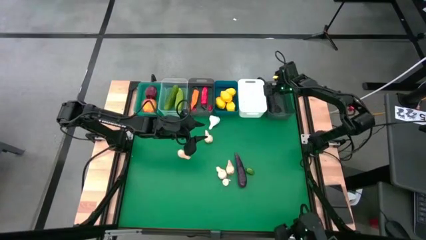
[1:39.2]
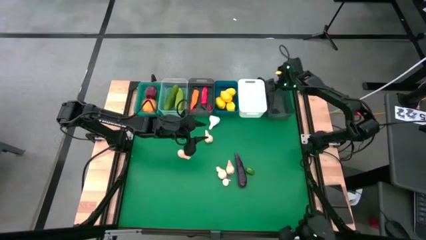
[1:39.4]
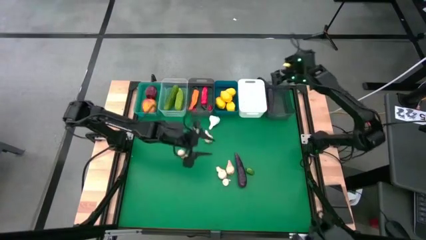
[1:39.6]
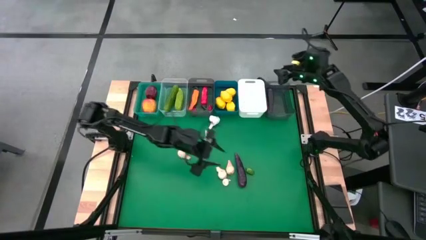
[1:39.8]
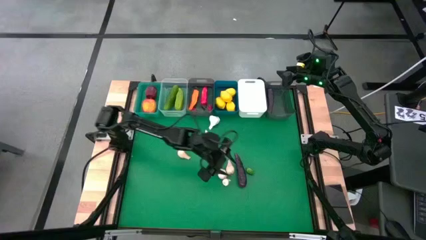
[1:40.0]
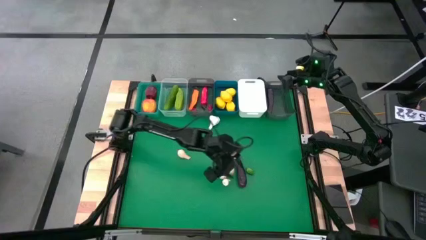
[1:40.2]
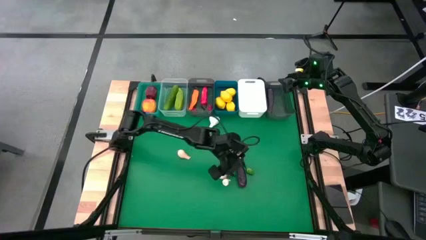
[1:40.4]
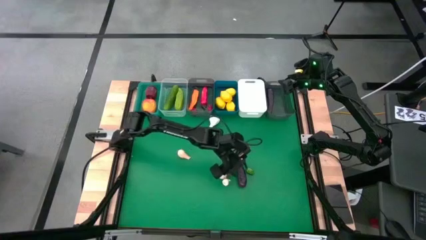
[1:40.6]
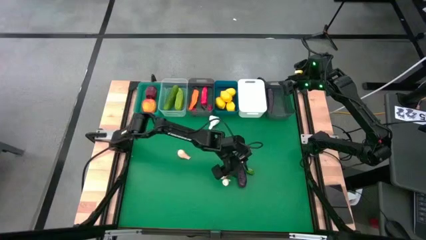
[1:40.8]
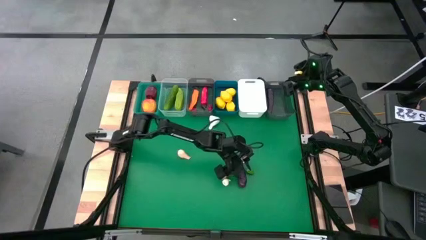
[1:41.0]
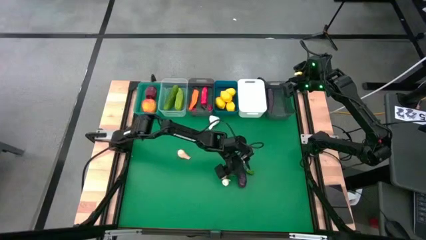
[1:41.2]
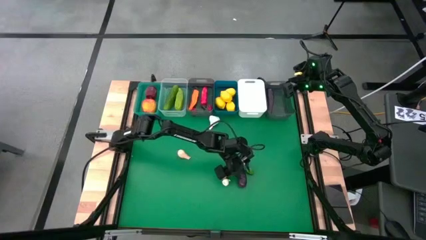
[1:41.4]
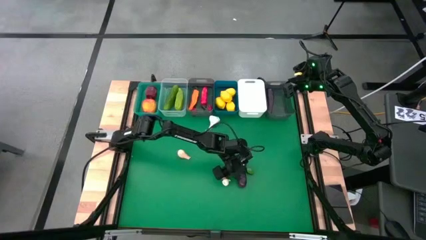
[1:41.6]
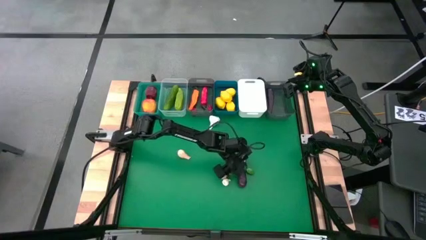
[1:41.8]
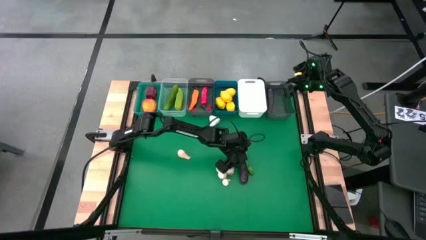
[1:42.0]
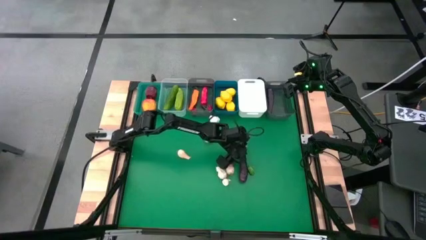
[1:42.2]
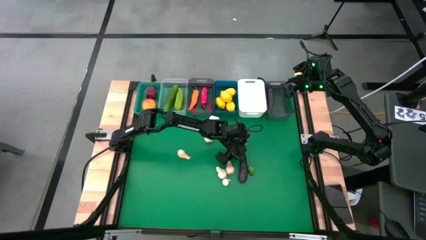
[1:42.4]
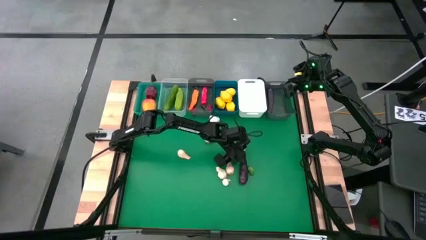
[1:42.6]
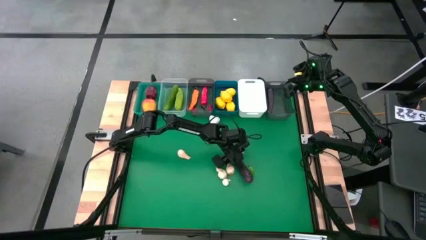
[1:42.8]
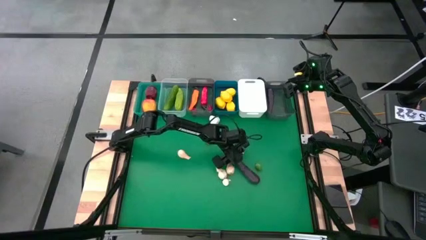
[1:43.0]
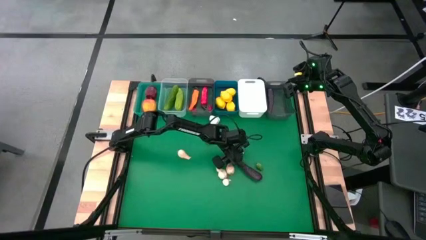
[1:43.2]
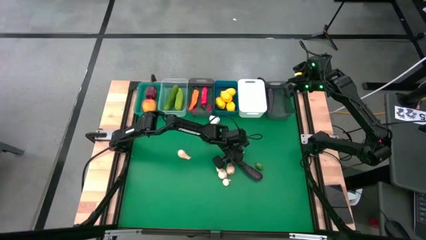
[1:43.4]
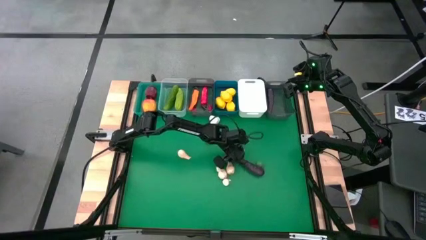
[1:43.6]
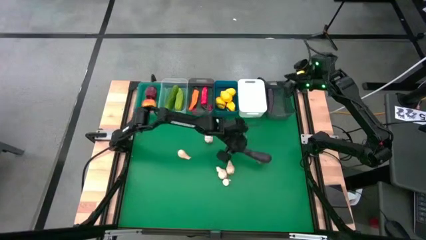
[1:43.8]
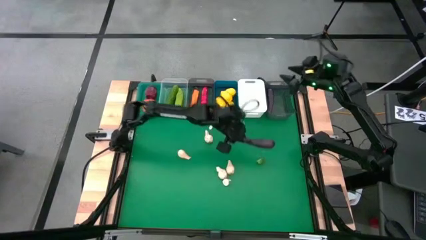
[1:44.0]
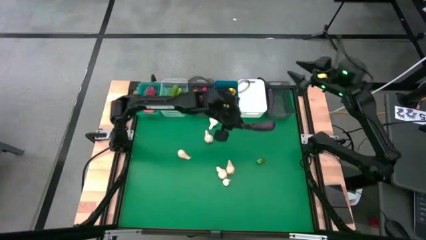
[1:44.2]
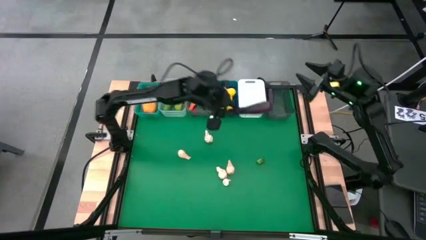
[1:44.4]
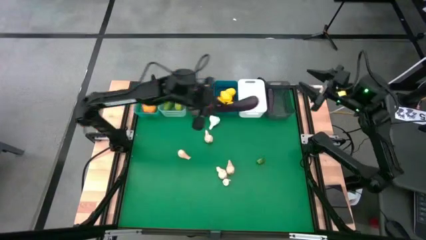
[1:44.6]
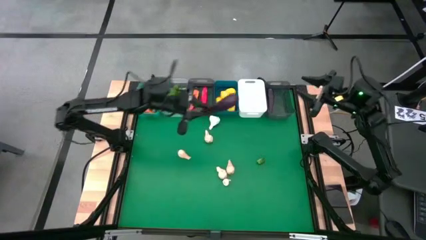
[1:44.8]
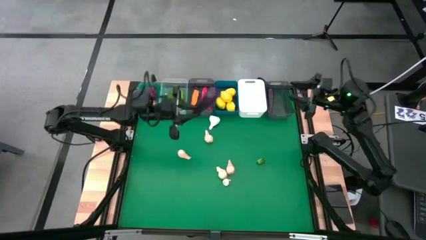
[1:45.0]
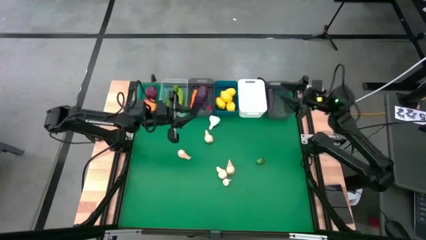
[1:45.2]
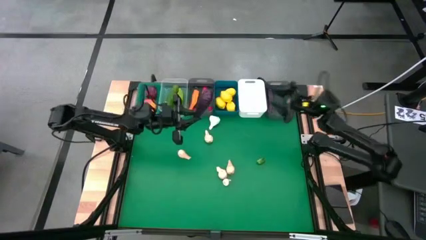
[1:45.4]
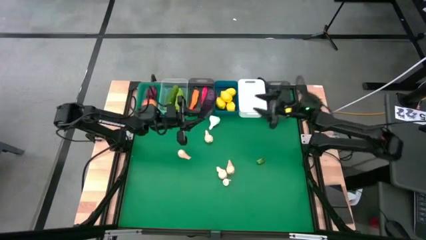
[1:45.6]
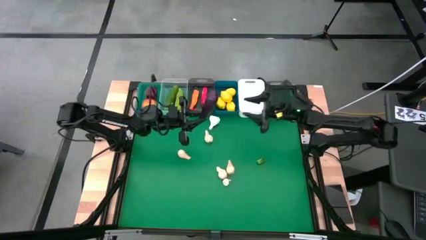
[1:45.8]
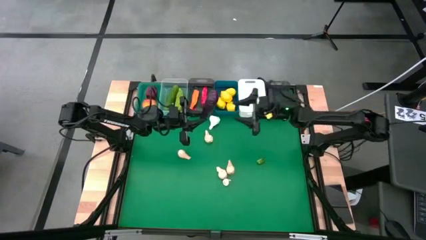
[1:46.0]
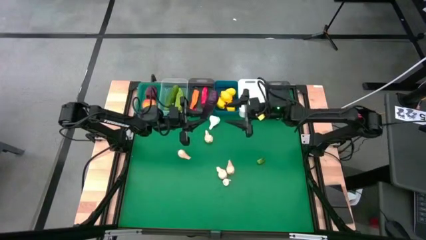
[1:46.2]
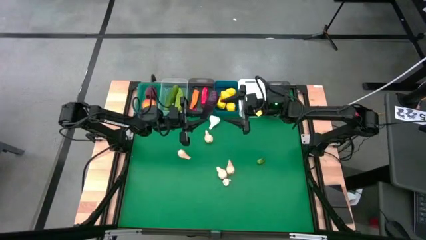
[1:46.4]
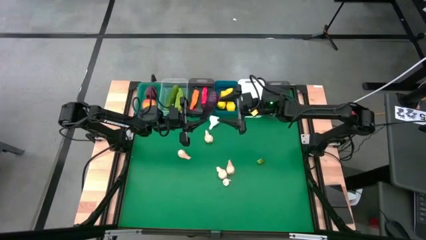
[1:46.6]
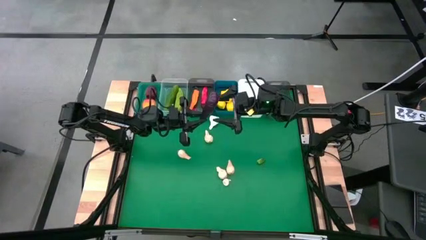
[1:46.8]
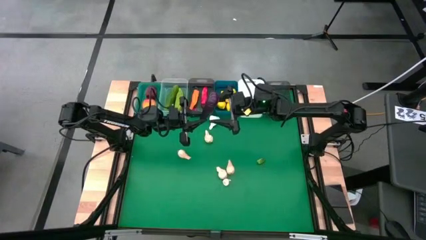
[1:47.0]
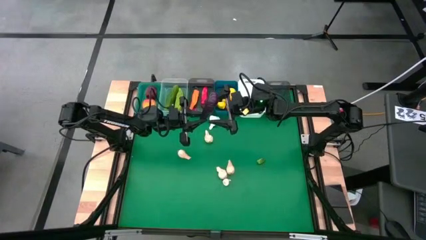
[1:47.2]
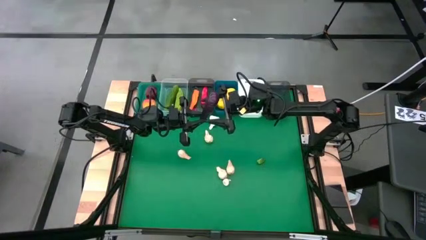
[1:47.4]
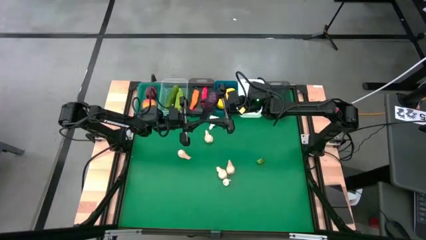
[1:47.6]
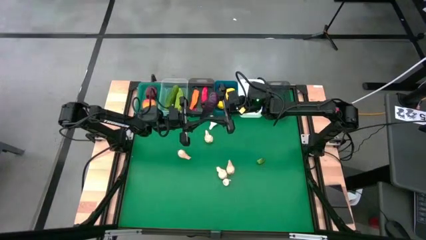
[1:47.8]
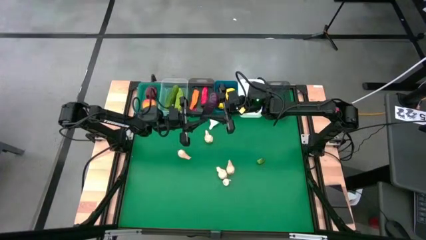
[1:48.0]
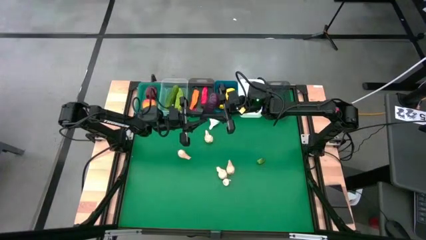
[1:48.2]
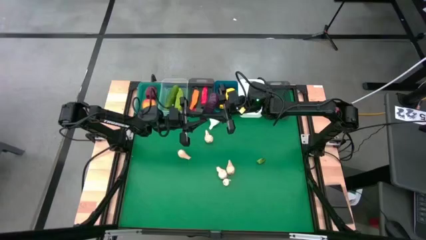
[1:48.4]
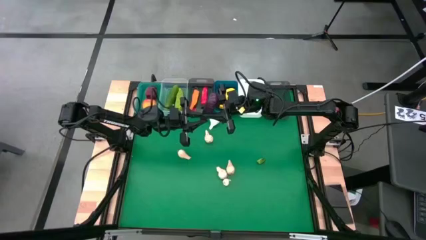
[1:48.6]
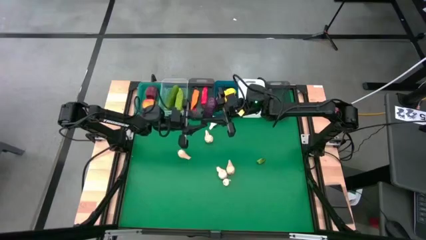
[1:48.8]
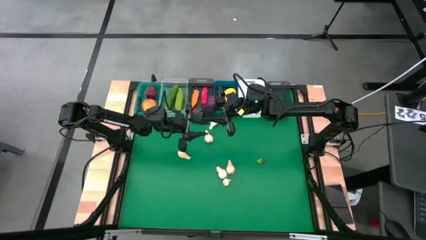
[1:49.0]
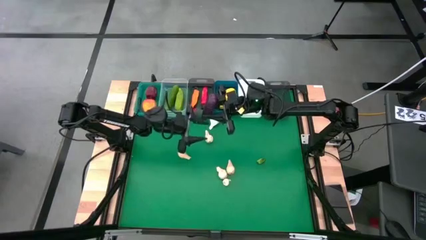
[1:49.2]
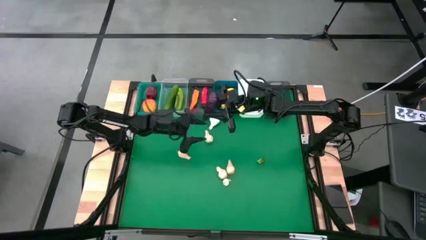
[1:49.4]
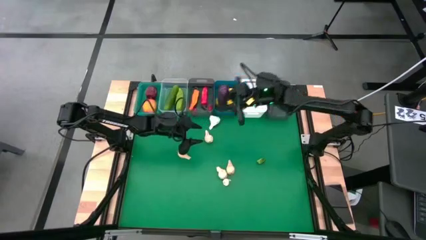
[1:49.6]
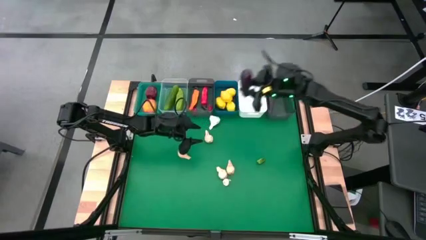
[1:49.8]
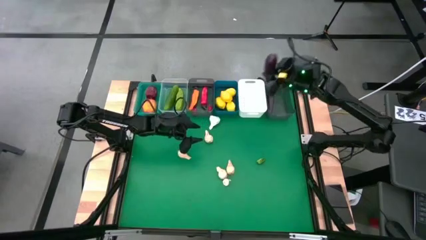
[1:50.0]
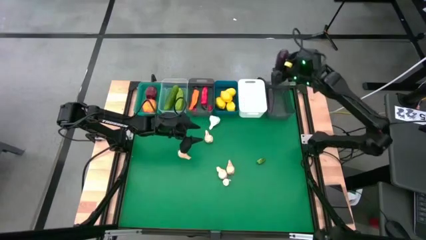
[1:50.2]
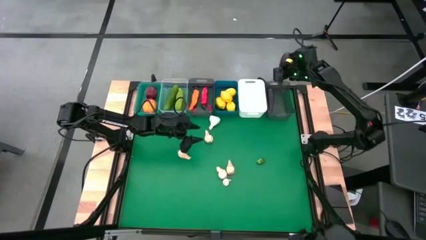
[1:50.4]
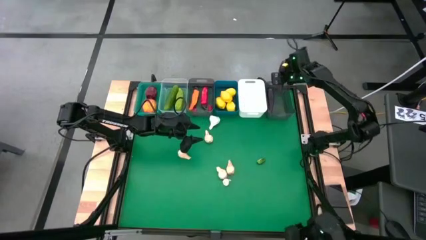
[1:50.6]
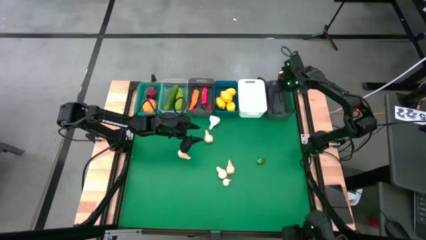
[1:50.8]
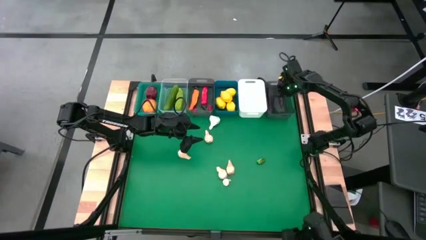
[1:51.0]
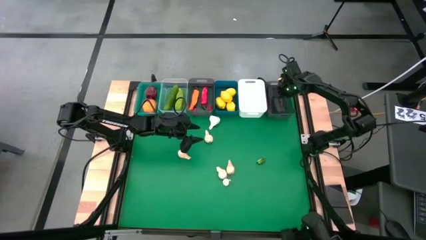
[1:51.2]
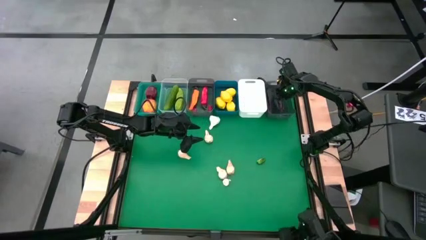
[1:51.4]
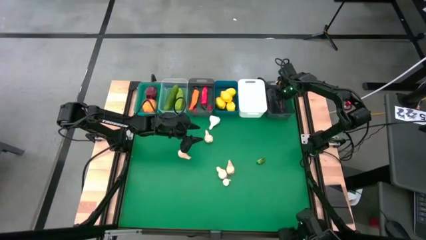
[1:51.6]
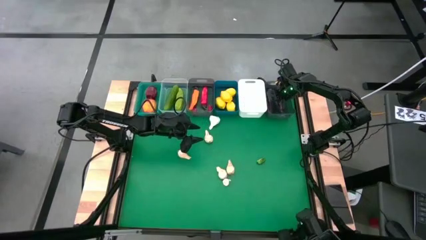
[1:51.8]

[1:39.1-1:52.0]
Task: Sort produce into baskets
Put the eggplant into the right black bin

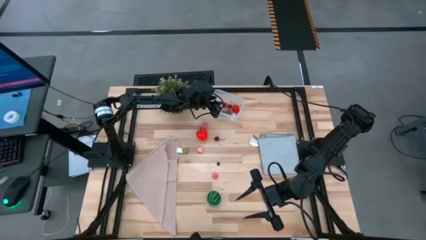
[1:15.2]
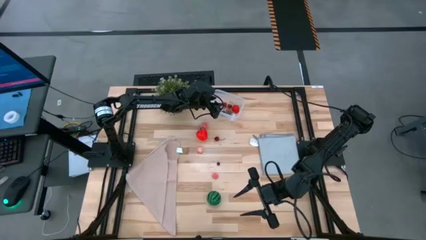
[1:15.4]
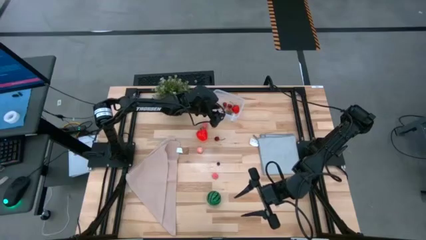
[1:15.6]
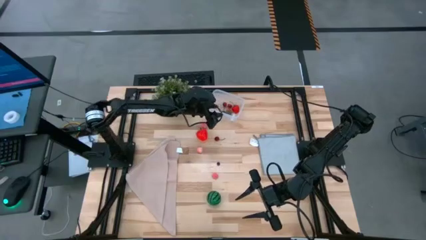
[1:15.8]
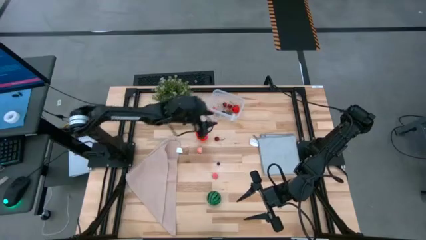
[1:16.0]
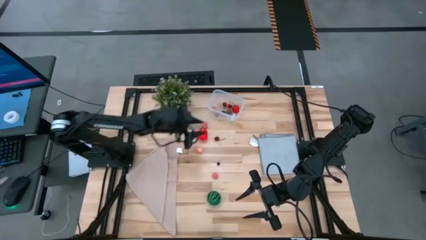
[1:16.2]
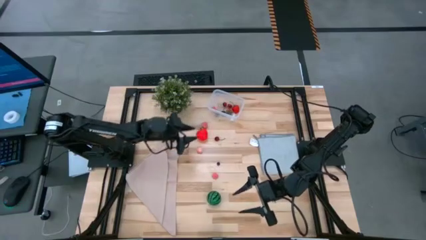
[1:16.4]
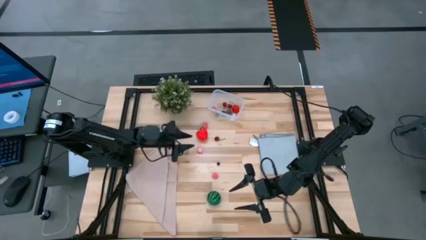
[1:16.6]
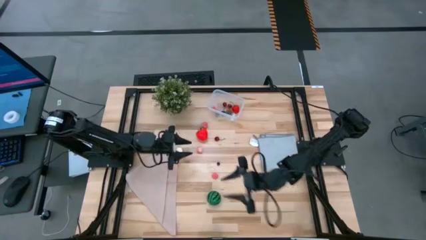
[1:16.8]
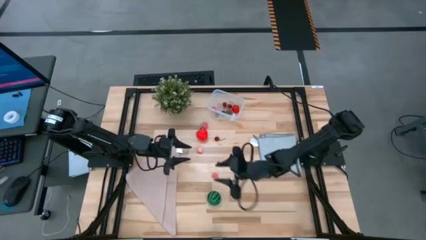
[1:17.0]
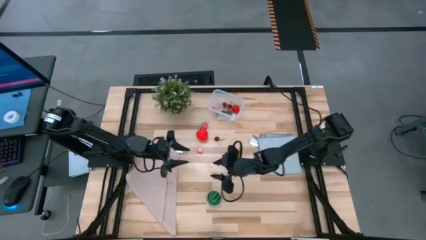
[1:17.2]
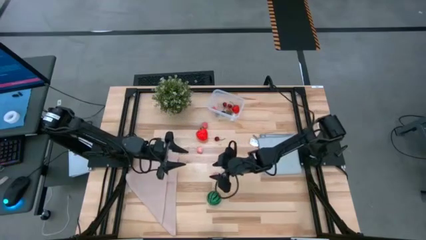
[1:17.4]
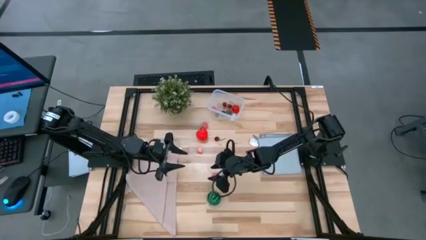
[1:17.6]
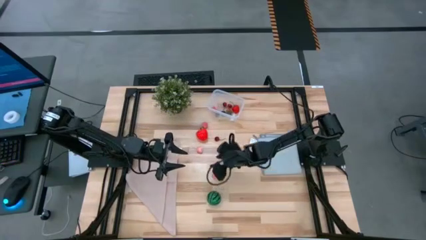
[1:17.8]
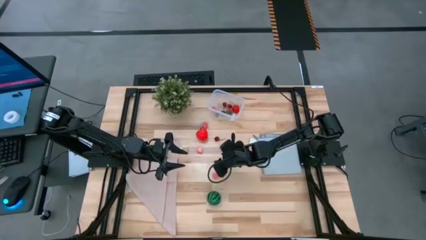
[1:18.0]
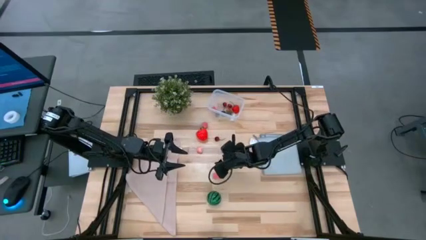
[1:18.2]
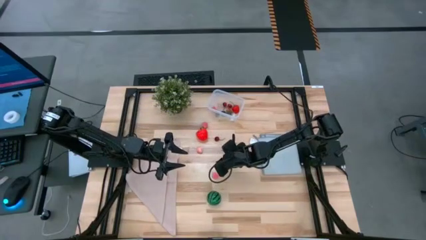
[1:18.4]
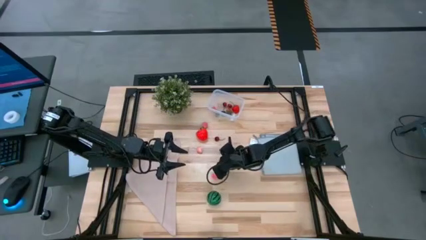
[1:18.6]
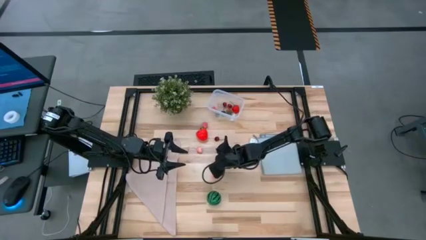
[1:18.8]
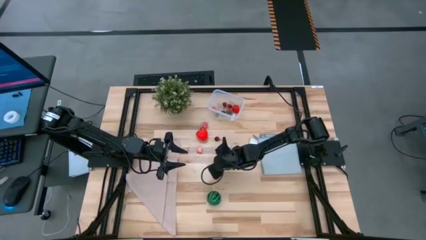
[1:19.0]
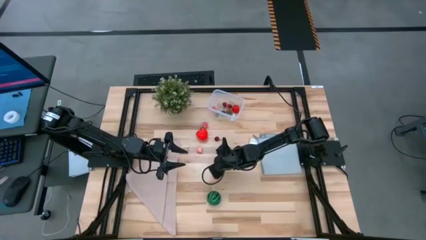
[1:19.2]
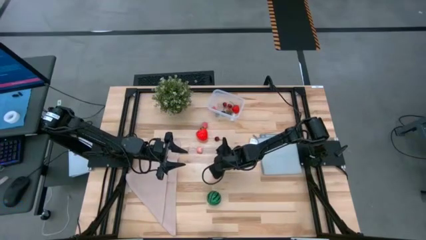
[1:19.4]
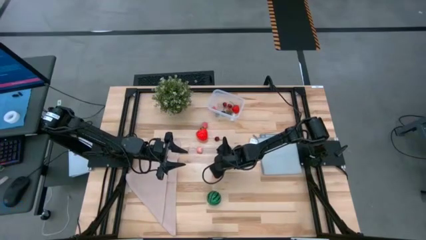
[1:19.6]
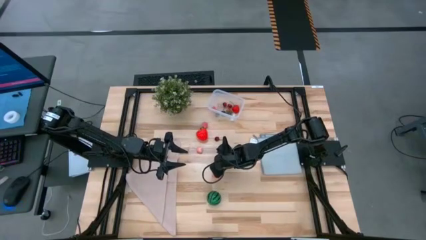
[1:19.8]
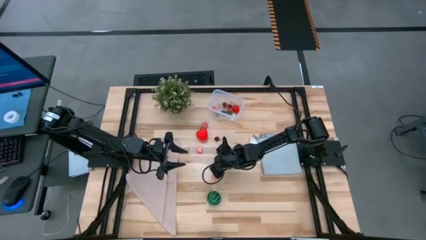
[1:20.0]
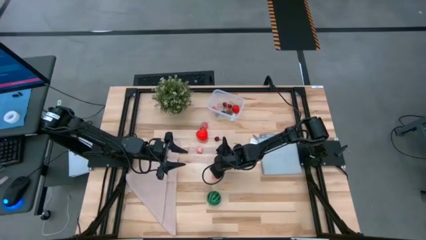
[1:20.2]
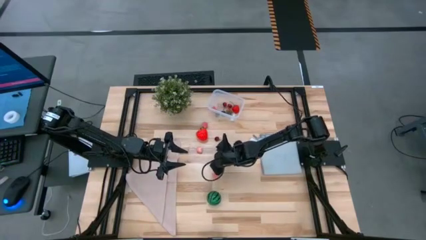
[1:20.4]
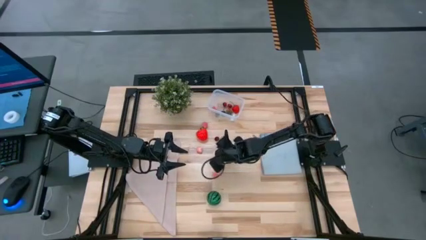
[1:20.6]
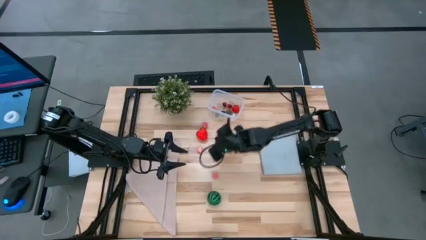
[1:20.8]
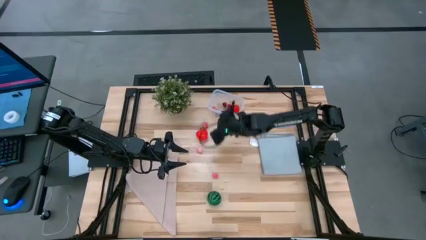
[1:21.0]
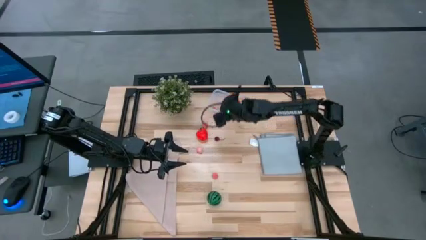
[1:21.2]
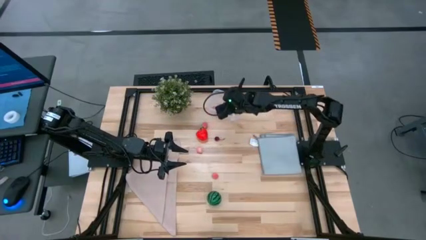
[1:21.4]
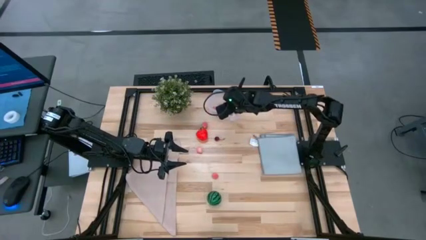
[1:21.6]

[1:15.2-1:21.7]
Task: Pick and placing Produce into tupperware
Put the blueberry into the transparent bin
